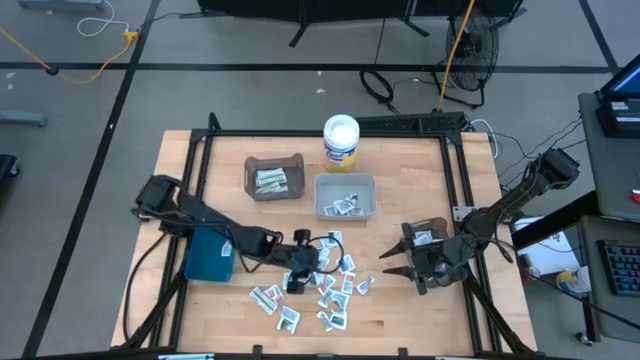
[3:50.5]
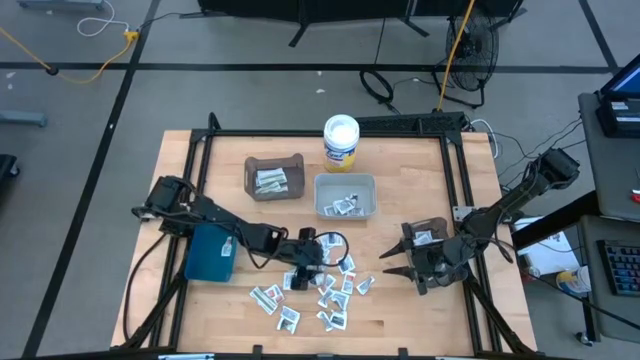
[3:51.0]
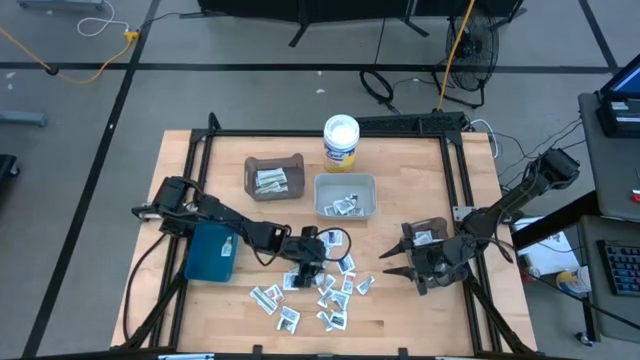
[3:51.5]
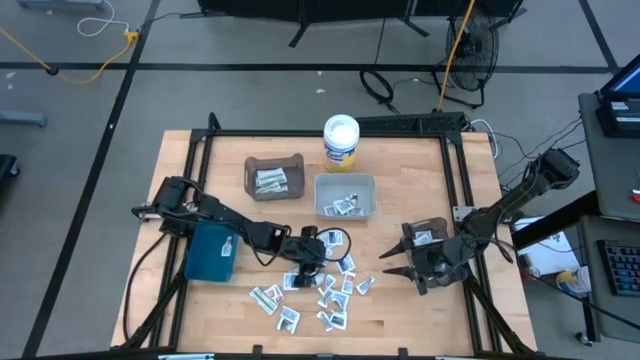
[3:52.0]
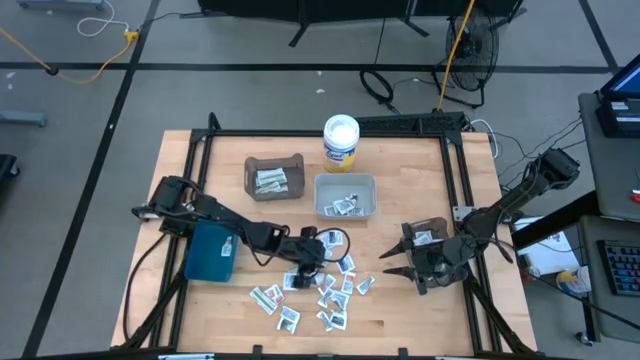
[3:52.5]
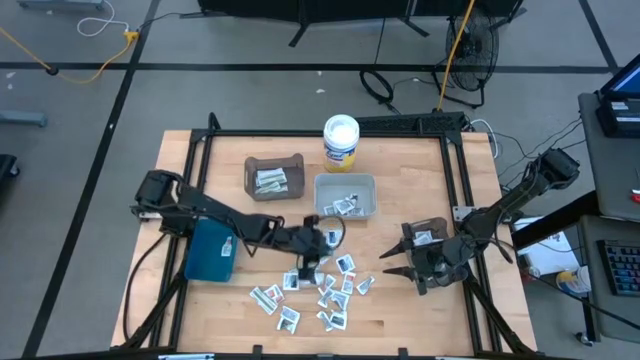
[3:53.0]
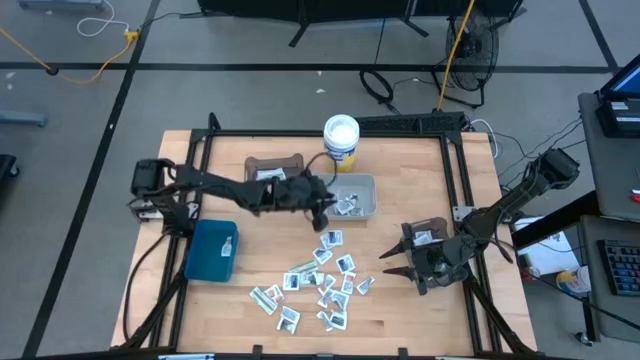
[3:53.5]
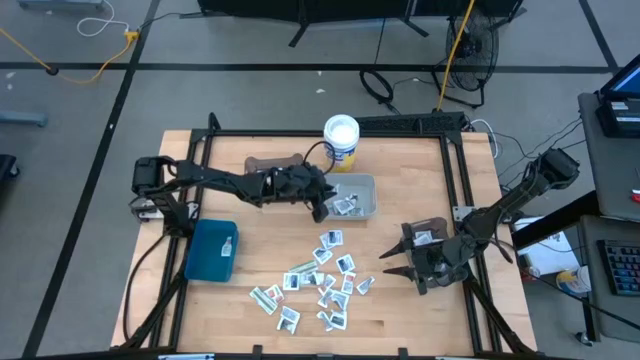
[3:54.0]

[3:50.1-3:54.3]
Task: Pick & Place First Aid Supplies
Put the gray towelette pack into the gray bin

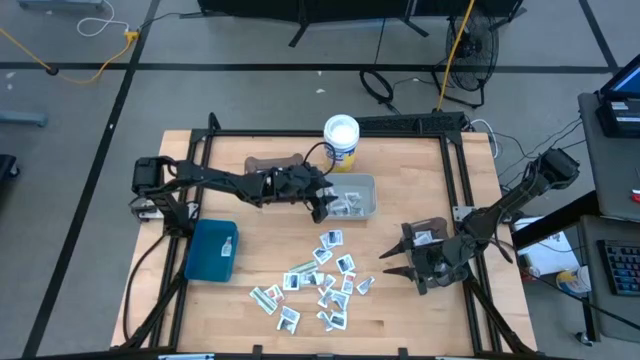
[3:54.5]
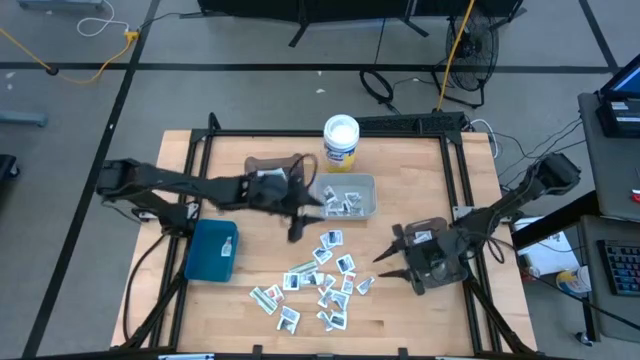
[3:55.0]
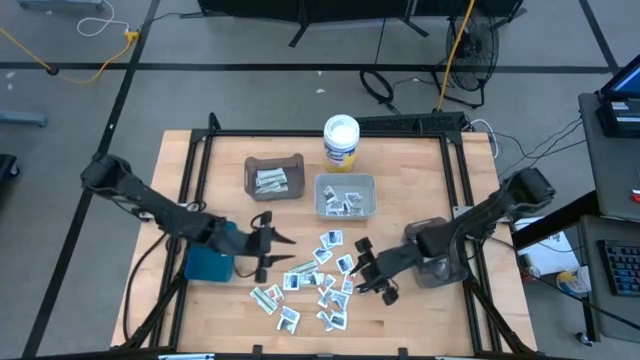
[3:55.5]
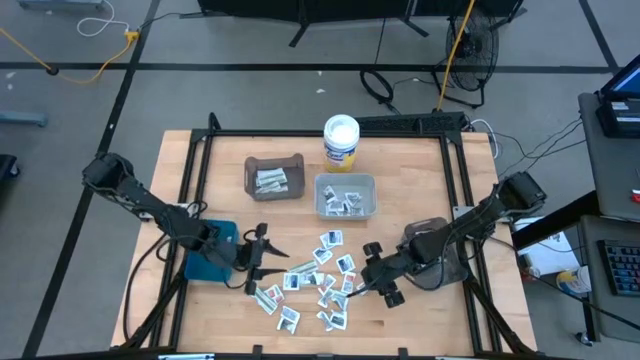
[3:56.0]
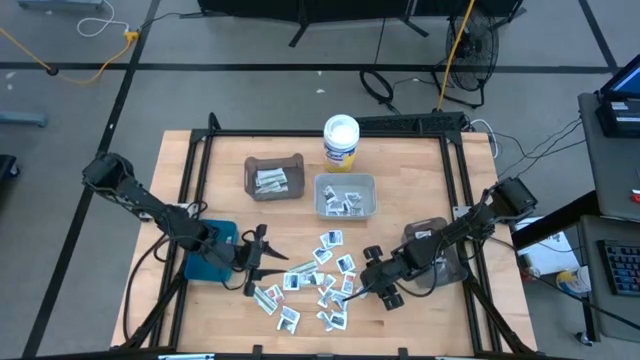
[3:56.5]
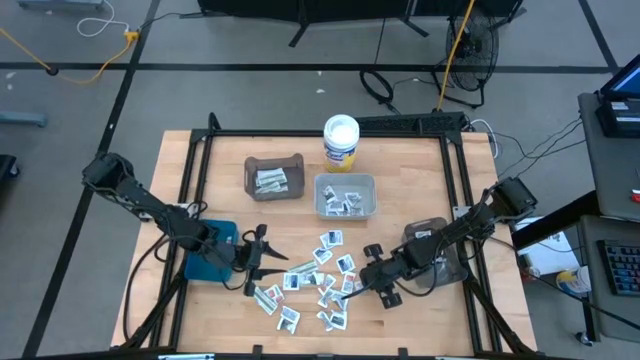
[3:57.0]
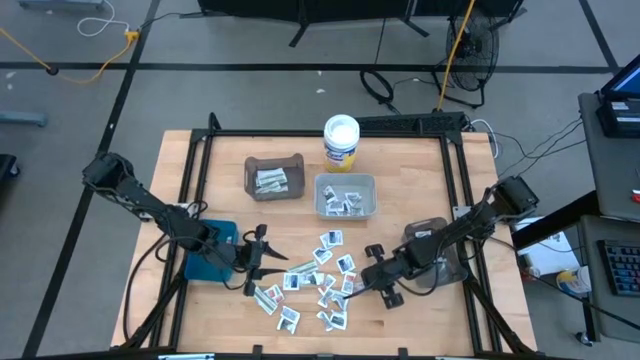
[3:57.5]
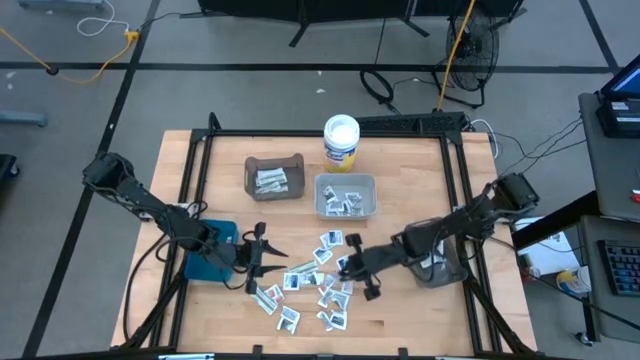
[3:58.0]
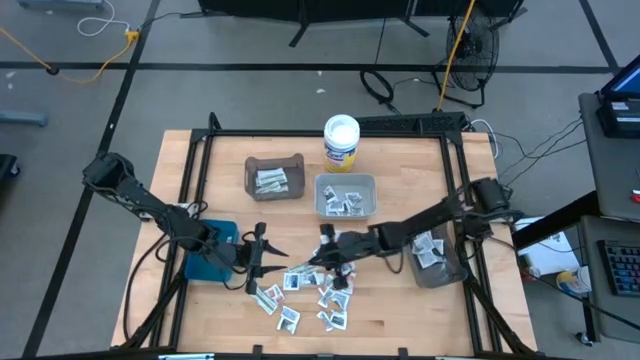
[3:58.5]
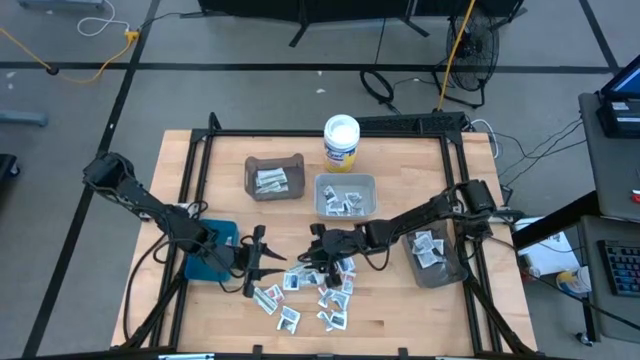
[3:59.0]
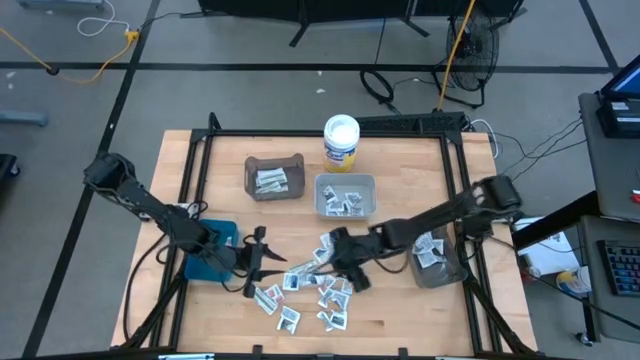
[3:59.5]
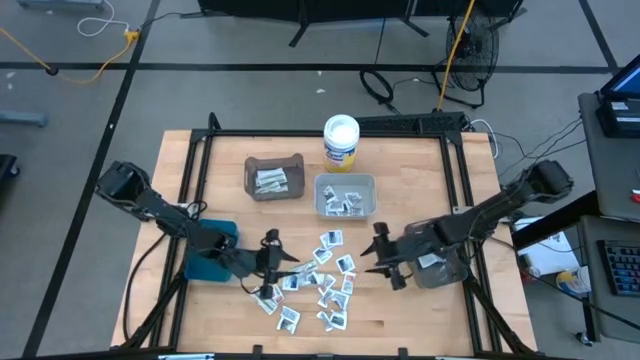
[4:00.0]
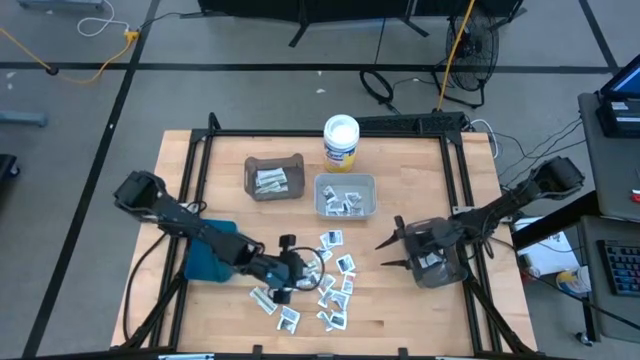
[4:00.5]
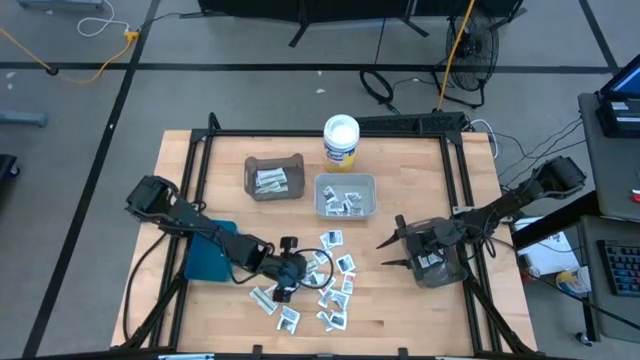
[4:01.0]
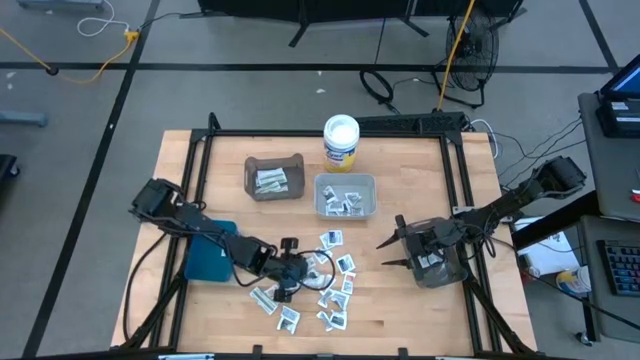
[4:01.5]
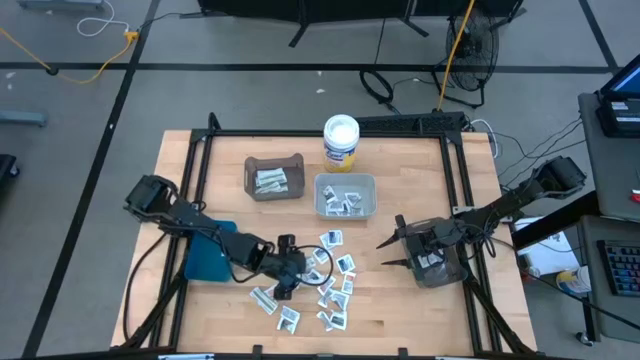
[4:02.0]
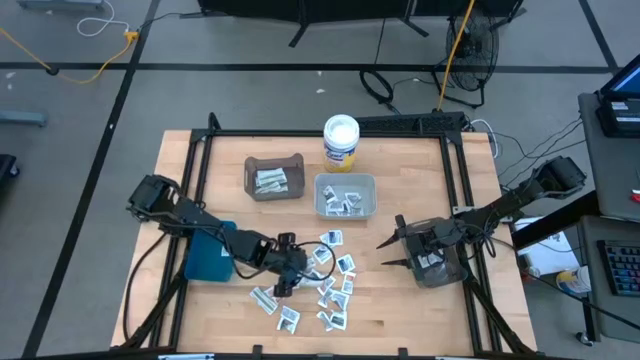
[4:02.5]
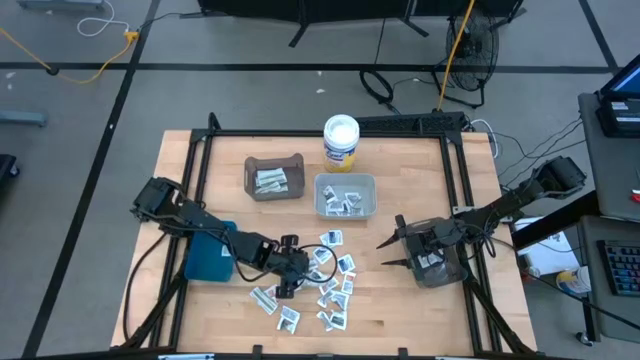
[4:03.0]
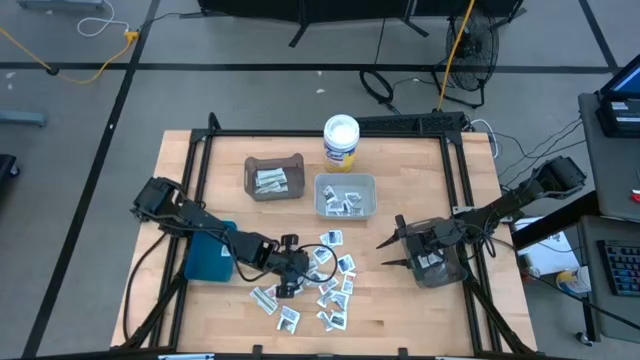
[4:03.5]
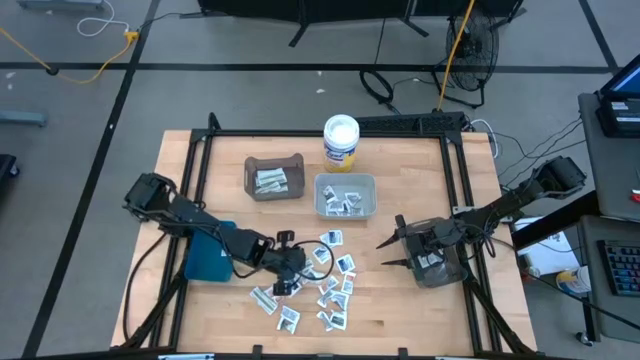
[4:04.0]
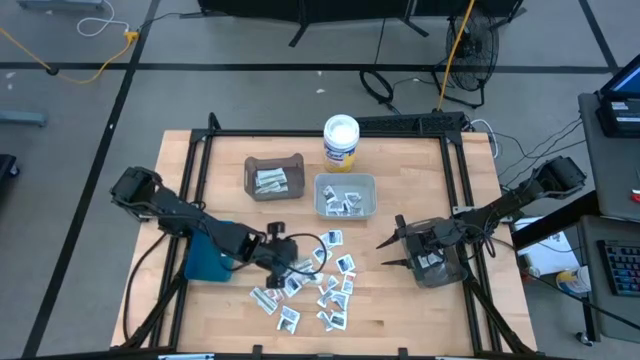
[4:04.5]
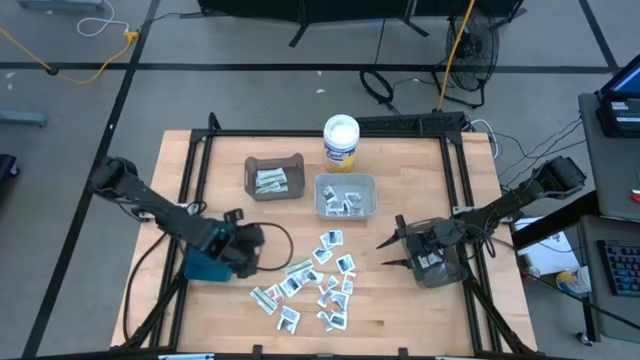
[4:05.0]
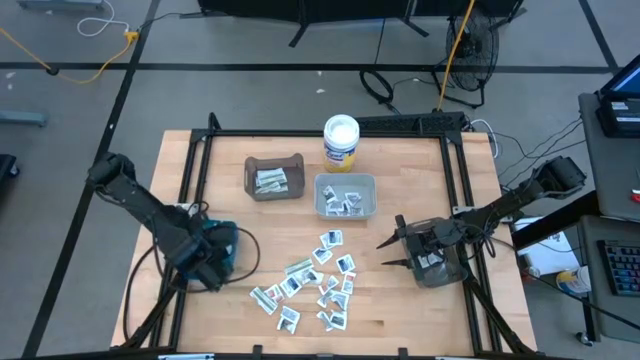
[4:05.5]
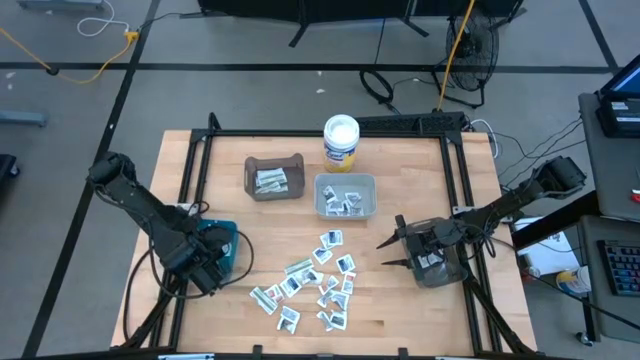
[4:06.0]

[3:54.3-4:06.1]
Put the orange ointment pack into the blue bin

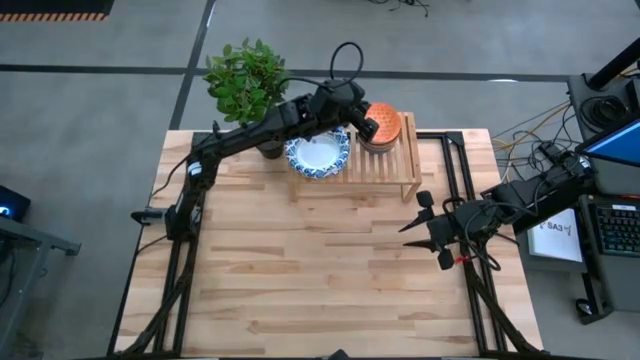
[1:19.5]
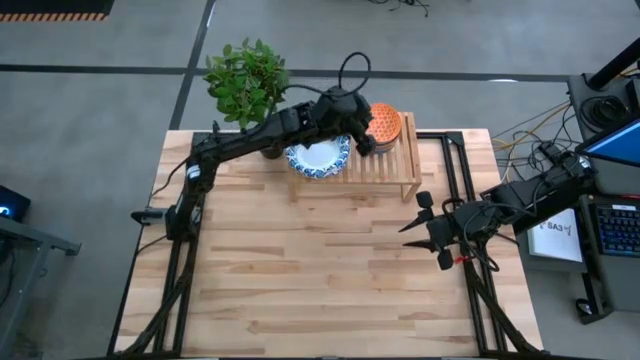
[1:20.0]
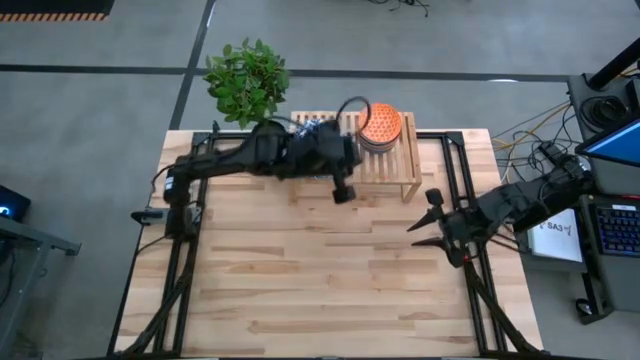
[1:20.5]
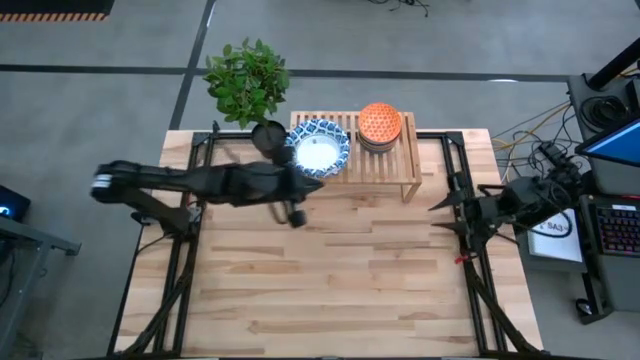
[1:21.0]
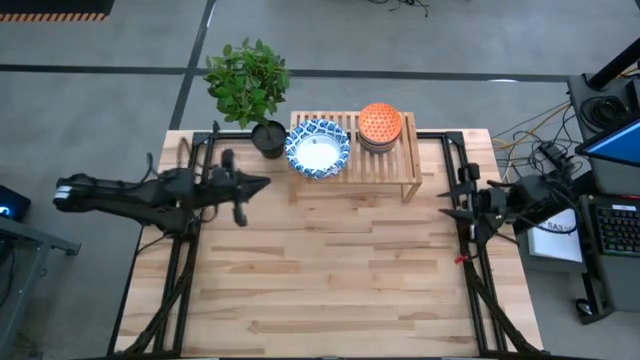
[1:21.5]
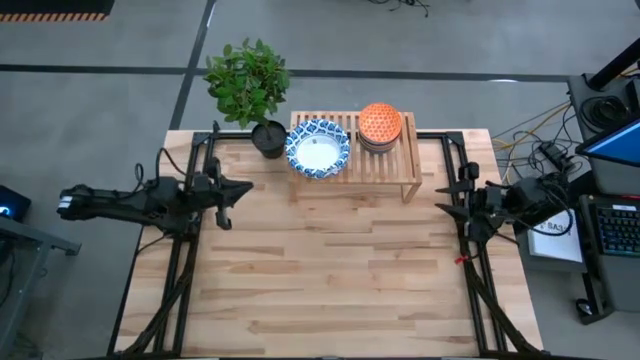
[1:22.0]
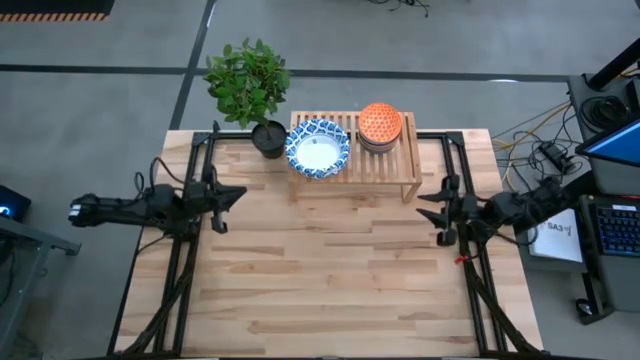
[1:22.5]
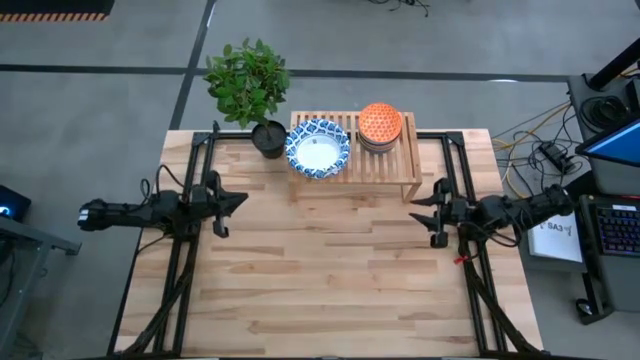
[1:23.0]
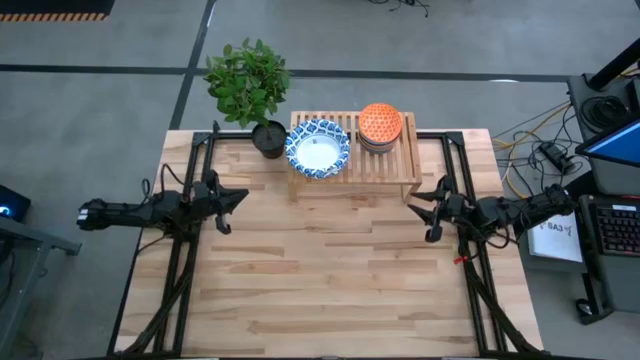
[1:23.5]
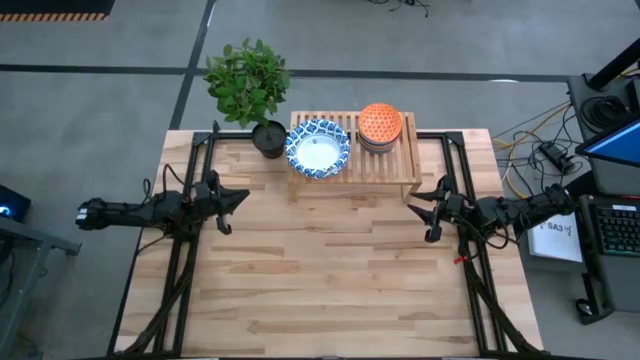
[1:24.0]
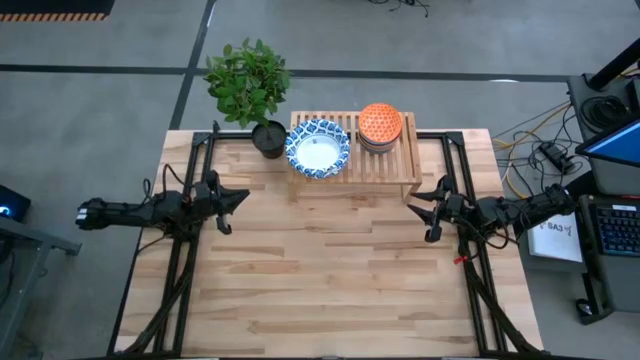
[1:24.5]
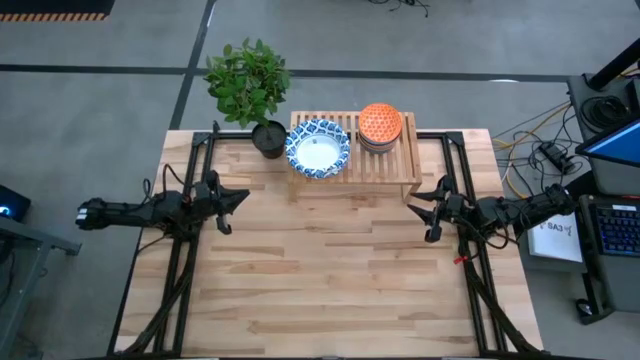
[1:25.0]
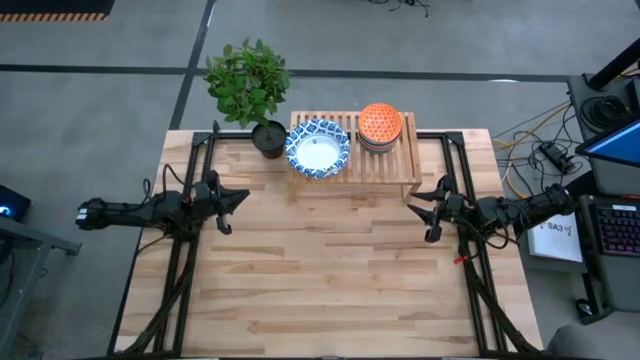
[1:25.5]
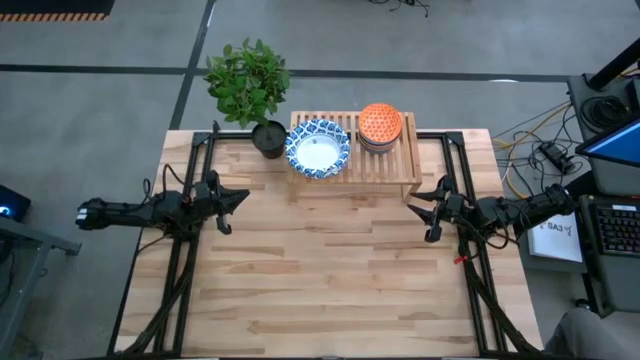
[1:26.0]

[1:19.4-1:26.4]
Task: Place and stack bowls onto a shelf
Return to Home Position
